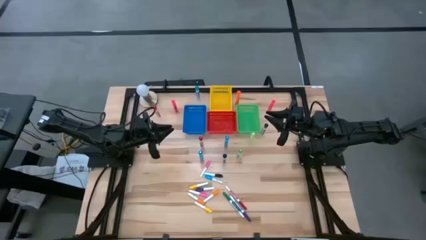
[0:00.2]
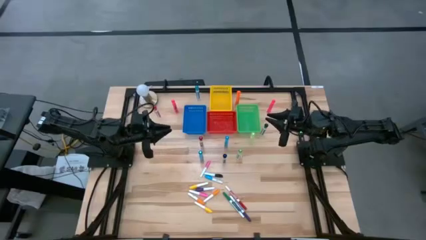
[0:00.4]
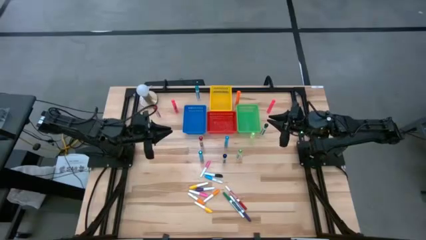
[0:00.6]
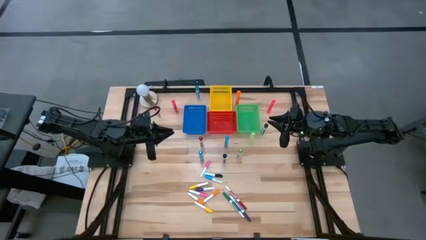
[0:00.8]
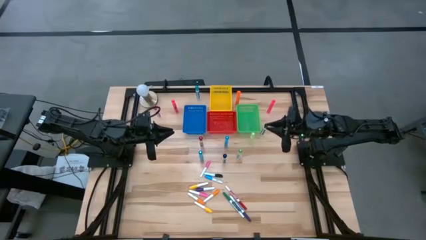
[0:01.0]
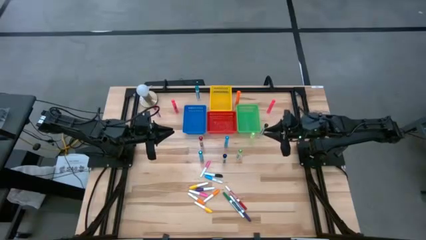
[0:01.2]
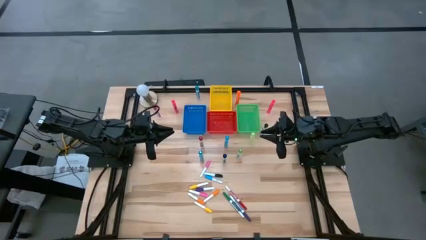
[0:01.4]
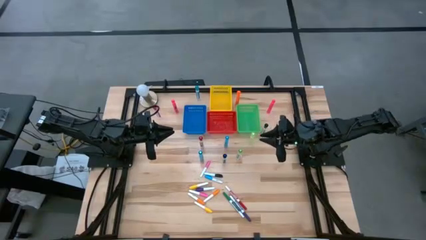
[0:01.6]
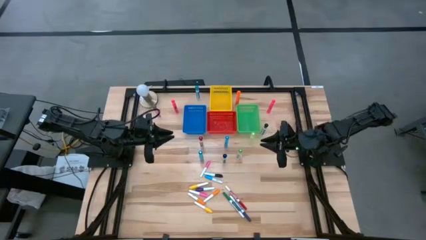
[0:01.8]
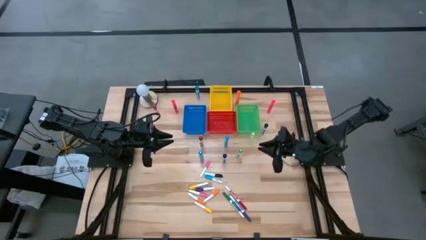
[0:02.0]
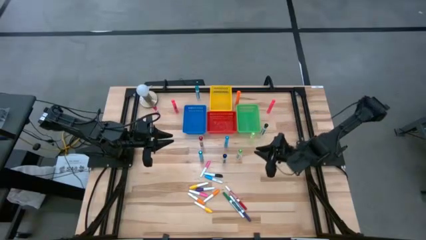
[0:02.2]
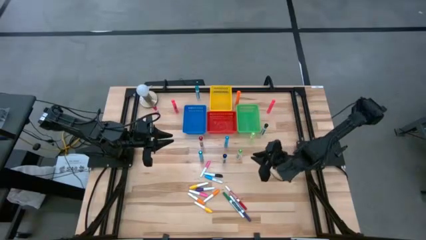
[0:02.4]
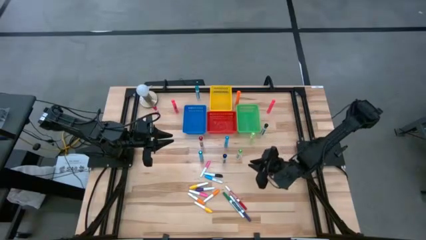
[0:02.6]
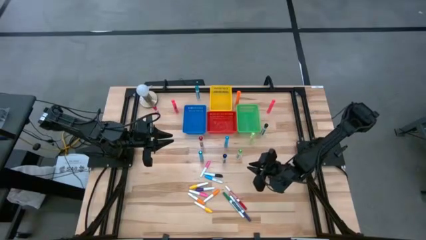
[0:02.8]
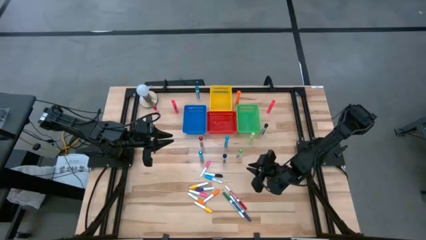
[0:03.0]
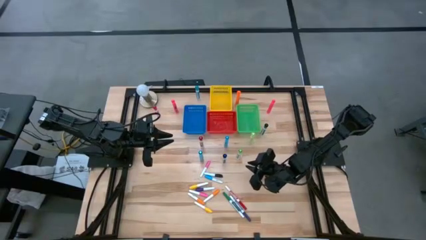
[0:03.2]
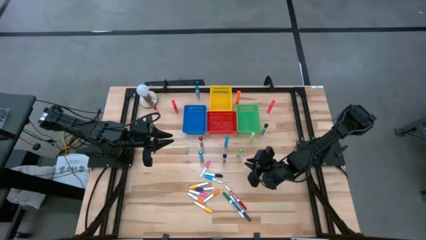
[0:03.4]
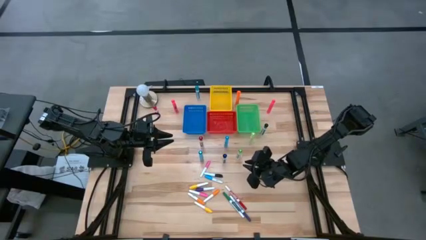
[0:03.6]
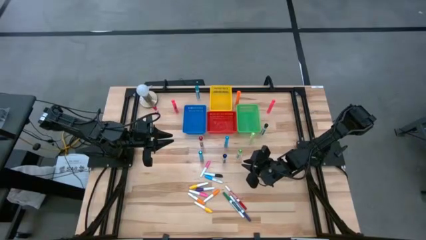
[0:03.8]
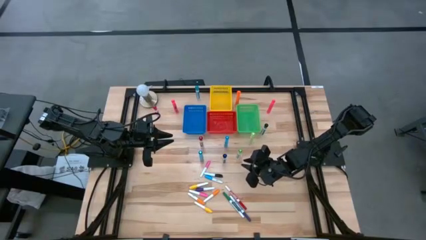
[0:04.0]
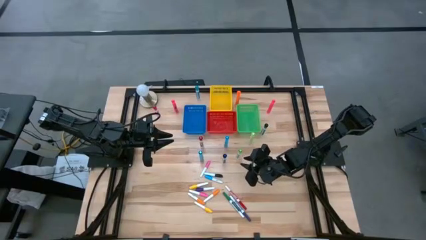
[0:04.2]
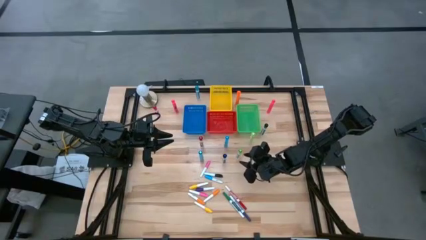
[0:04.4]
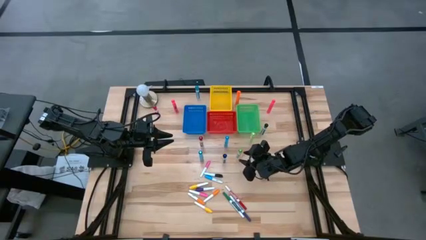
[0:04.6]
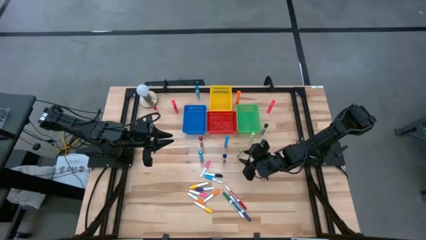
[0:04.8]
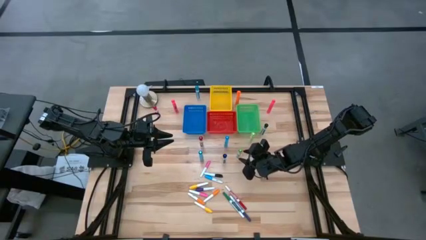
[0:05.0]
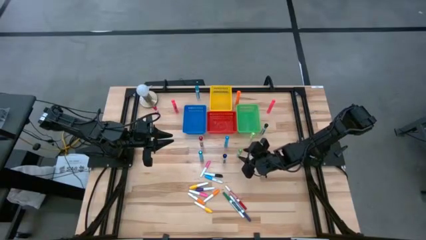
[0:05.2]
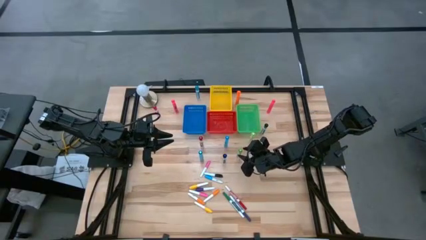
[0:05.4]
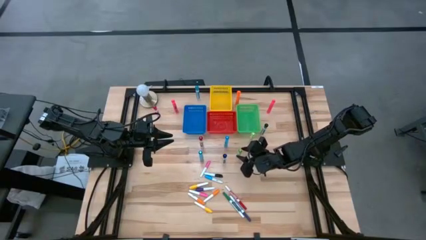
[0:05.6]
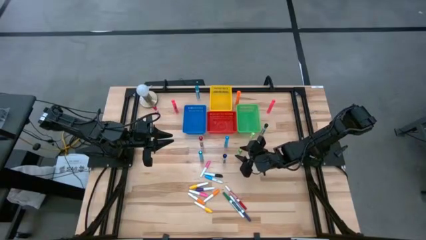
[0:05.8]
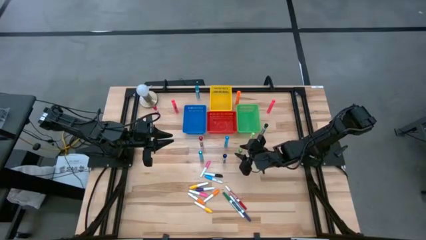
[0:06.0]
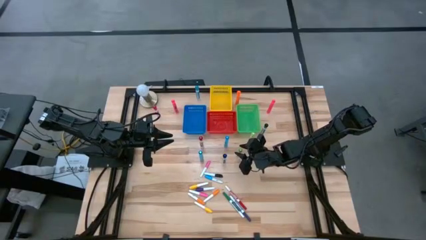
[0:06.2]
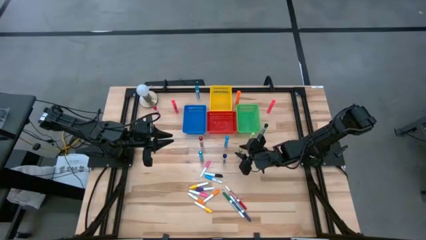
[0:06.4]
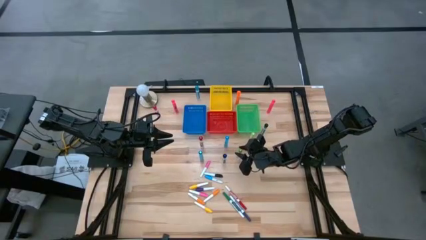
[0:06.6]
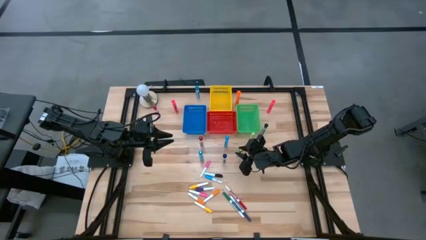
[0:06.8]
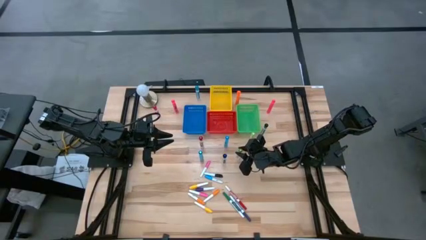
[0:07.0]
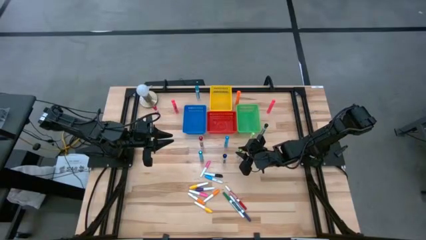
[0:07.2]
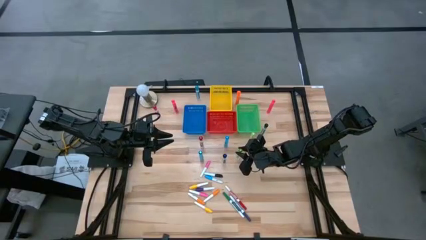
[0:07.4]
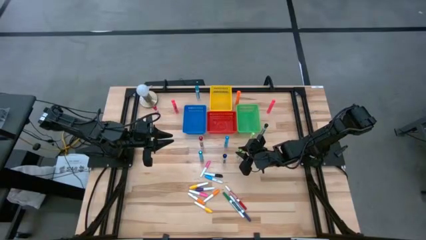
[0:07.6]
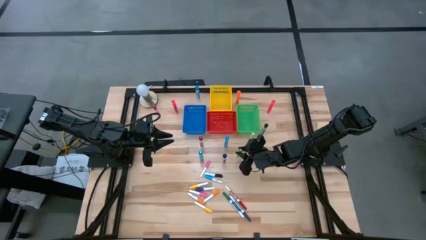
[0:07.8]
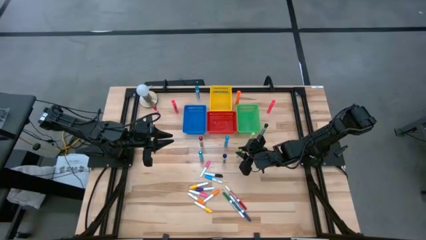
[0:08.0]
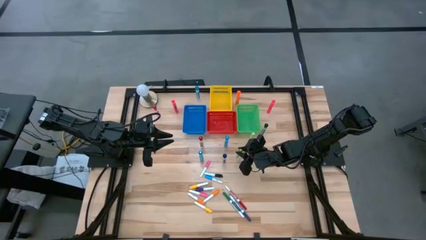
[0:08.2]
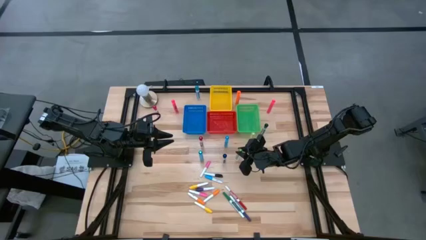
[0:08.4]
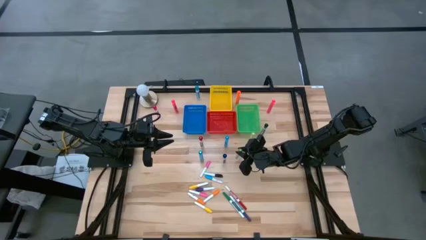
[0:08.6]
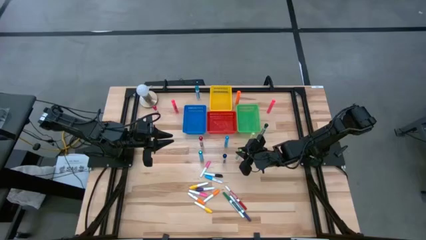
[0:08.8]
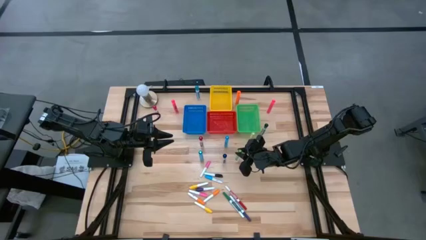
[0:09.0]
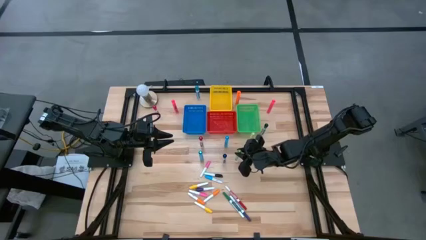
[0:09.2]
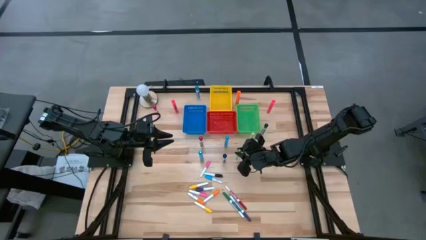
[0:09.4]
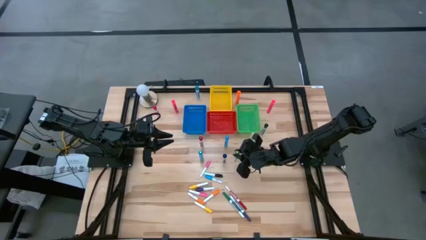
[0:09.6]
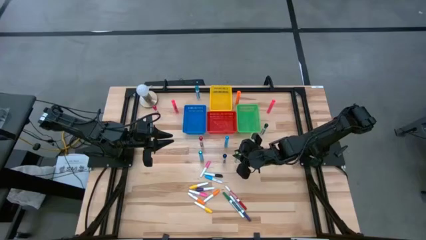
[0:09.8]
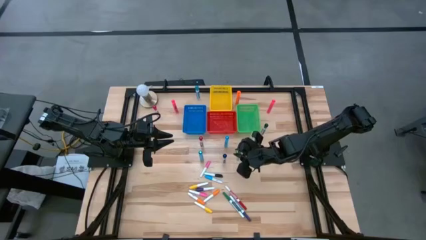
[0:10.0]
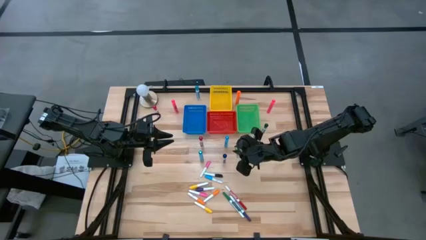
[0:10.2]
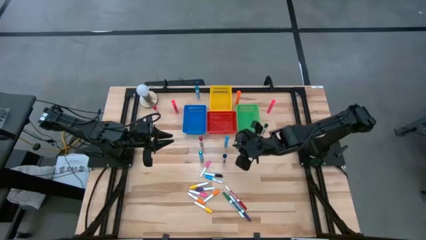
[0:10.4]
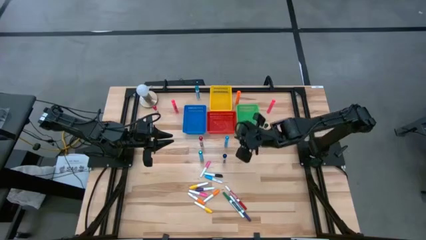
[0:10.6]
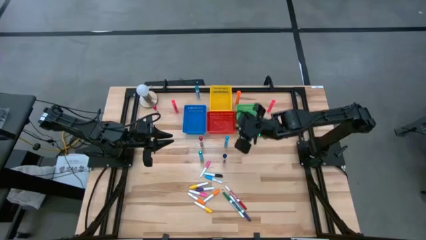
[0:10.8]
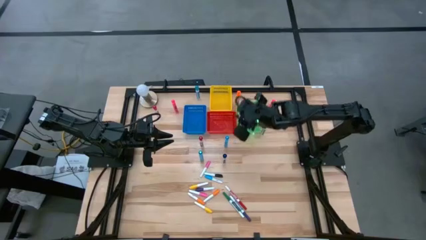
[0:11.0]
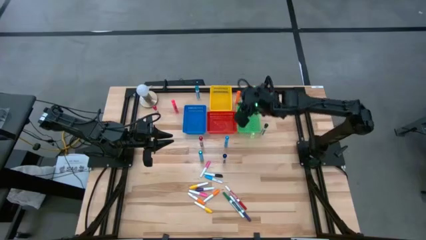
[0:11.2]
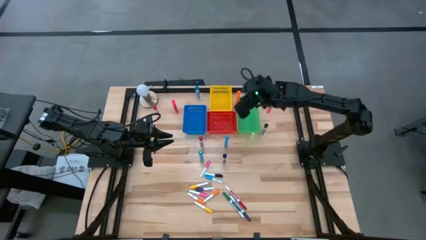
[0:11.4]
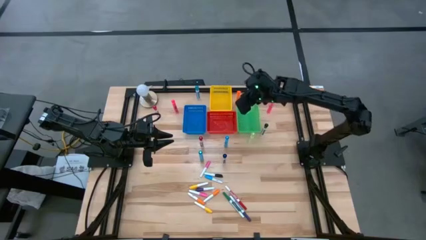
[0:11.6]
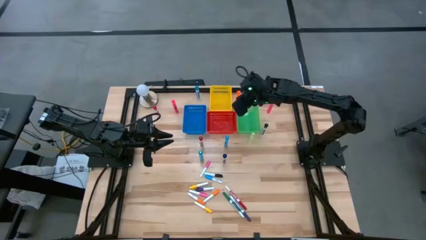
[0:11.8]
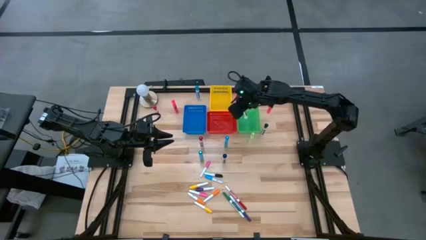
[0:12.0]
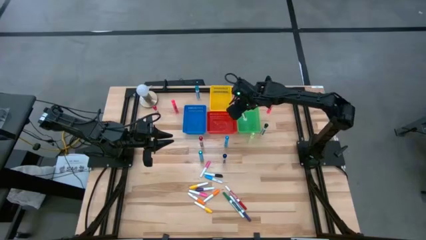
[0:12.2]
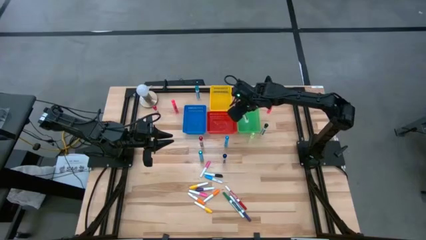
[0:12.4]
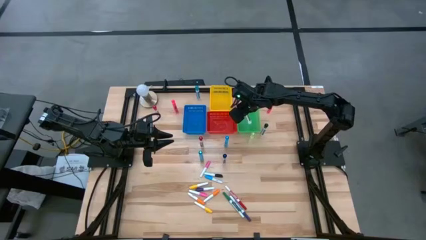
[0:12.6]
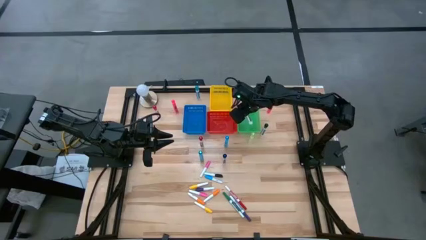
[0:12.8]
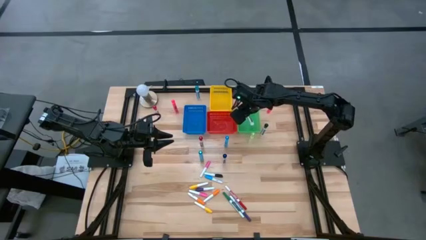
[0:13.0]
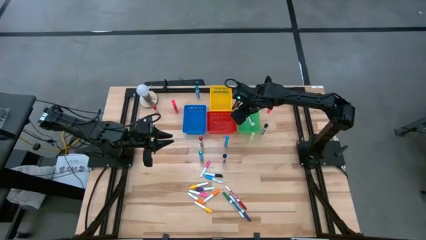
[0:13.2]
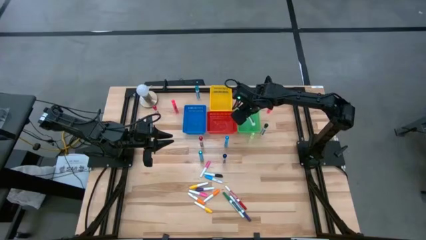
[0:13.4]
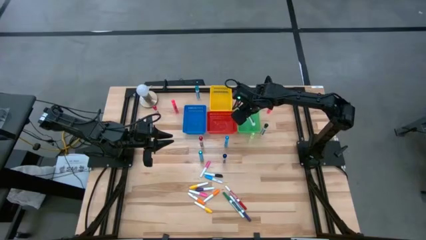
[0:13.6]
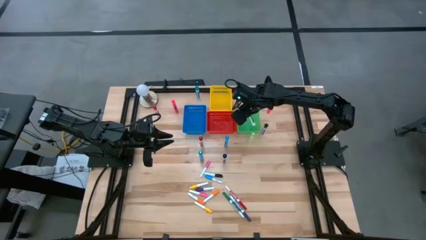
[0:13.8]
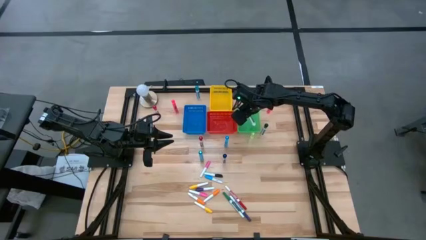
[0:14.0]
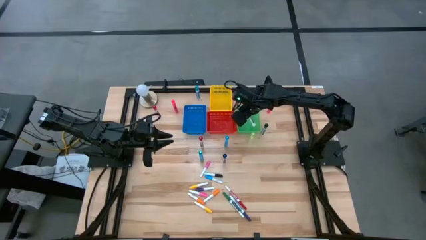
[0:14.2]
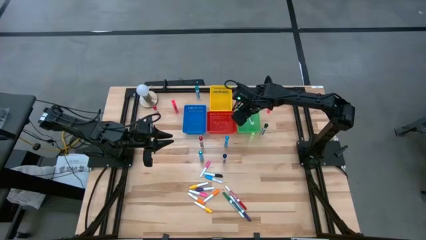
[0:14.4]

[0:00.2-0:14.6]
Task: Pick & Place Markers
Put the large light green marker pen into the green bin
